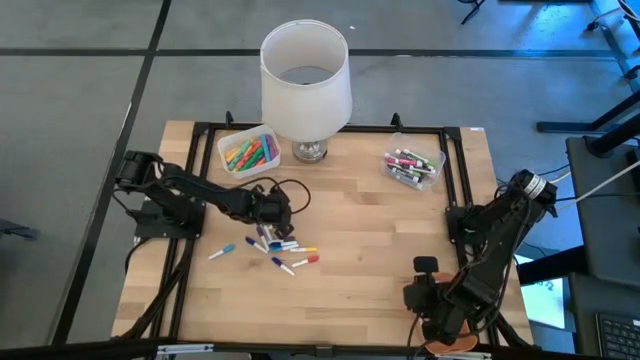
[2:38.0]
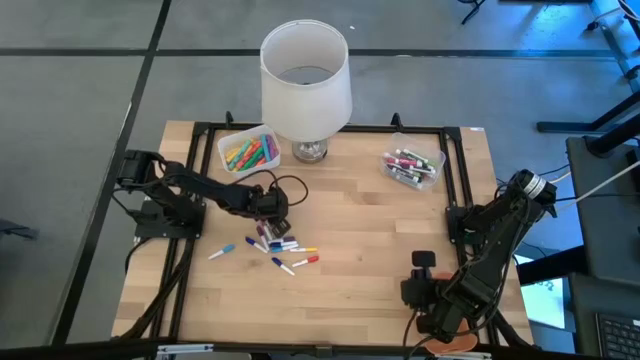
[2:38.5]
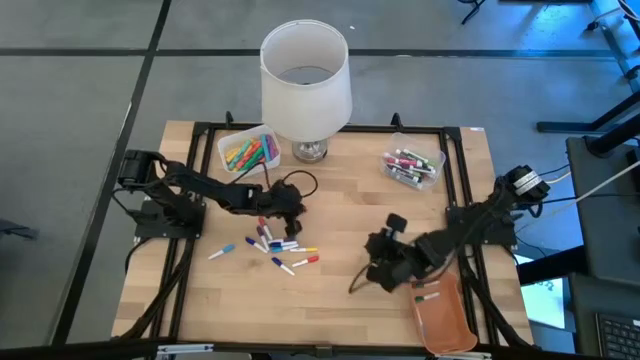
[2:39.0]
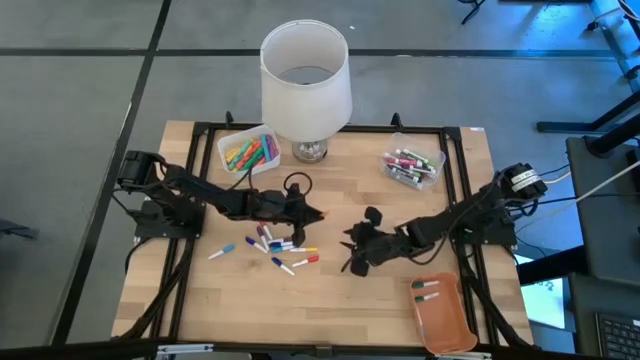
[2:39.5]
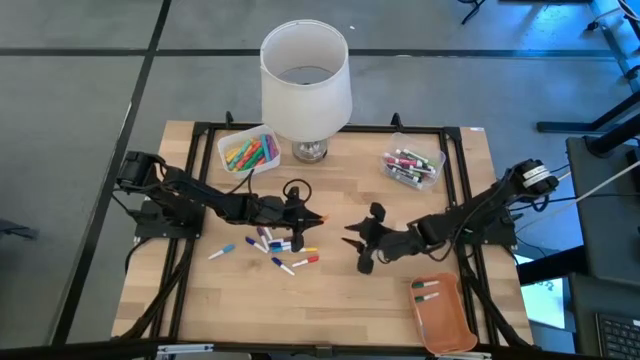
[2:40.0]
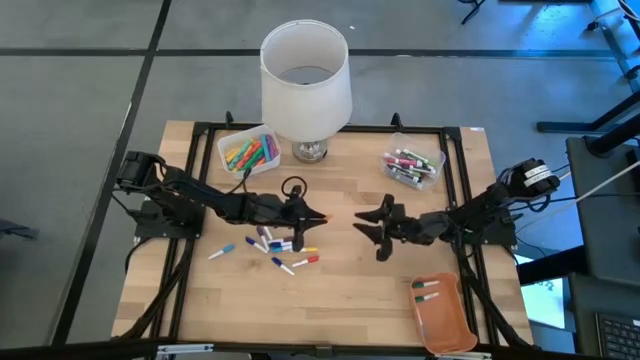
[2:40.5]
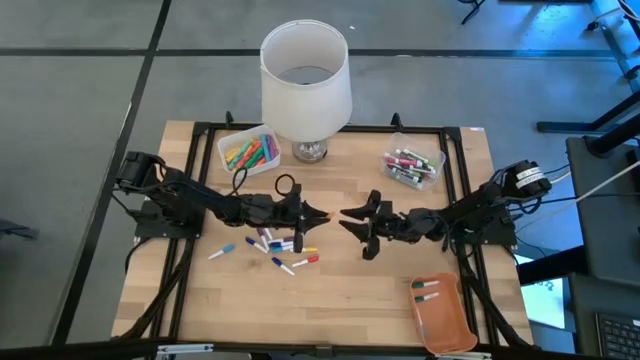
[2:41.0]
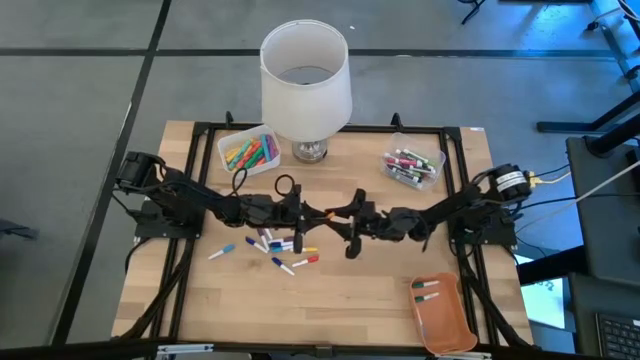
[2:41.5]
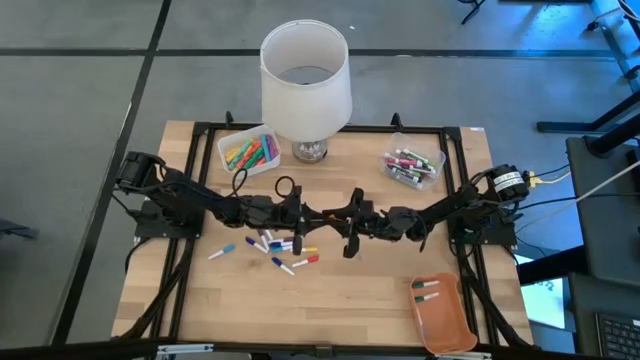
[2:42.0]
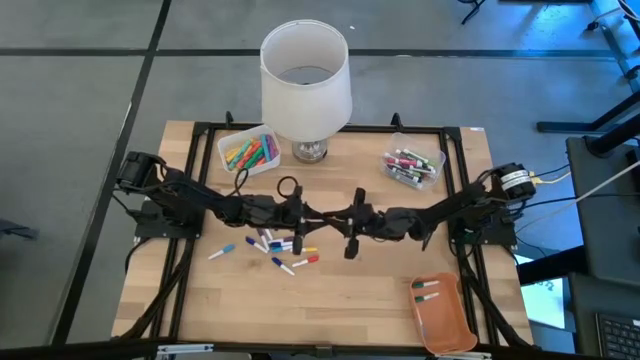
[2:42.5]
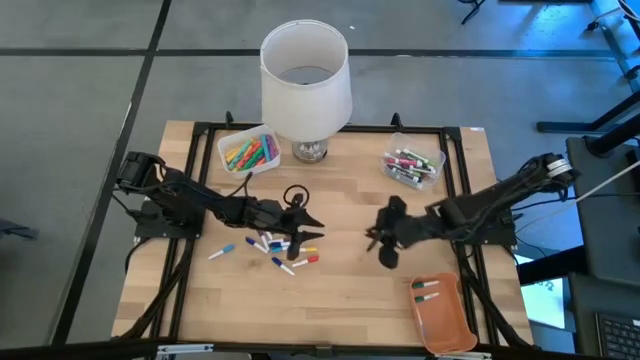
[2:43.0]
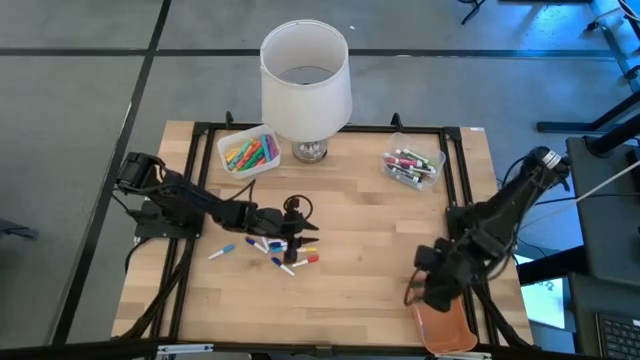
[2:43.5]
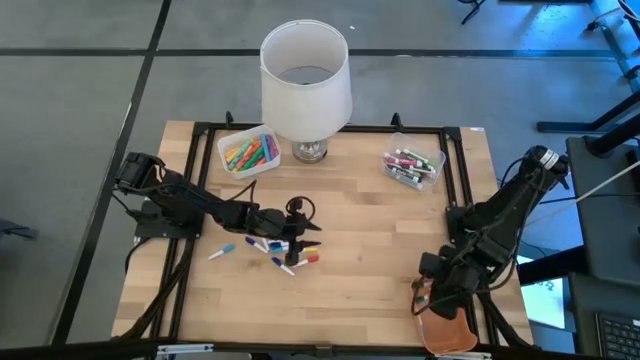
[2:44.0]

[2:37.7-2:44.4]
Task: Pick & Place Markers
Put the light orange mini marker into the orange bin

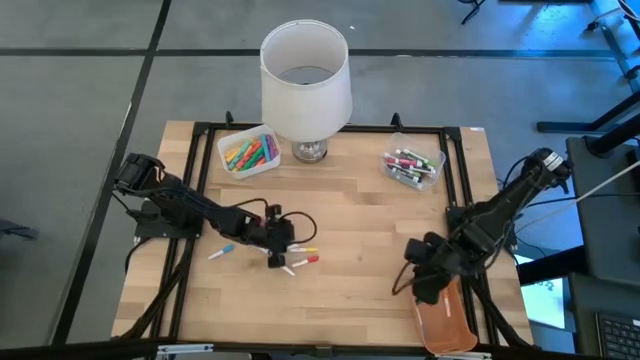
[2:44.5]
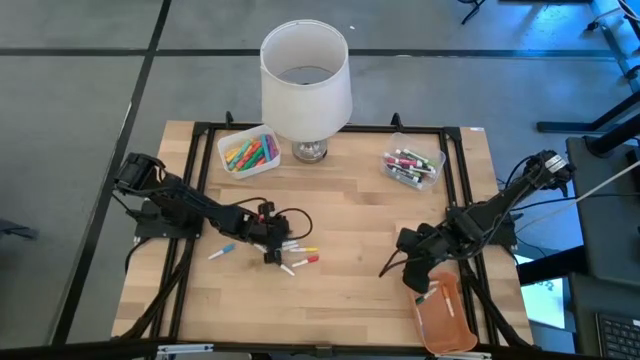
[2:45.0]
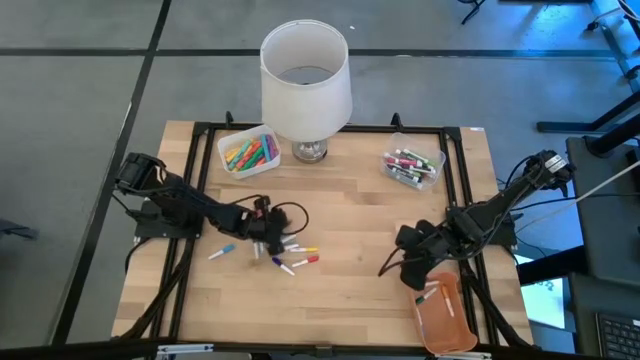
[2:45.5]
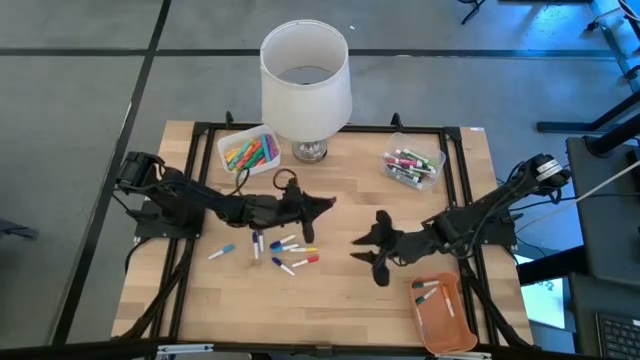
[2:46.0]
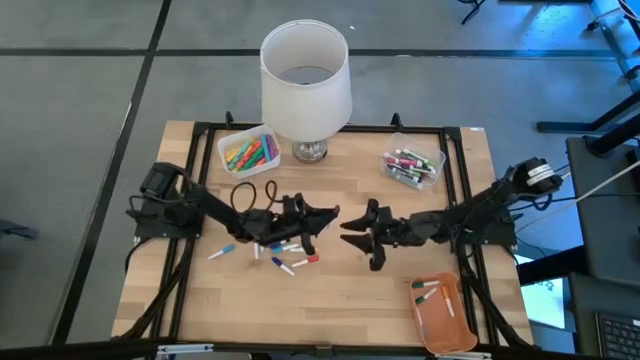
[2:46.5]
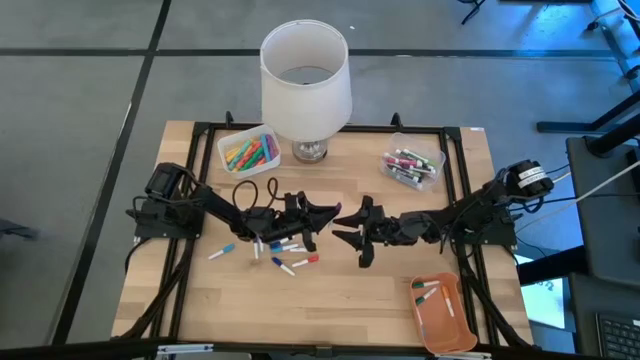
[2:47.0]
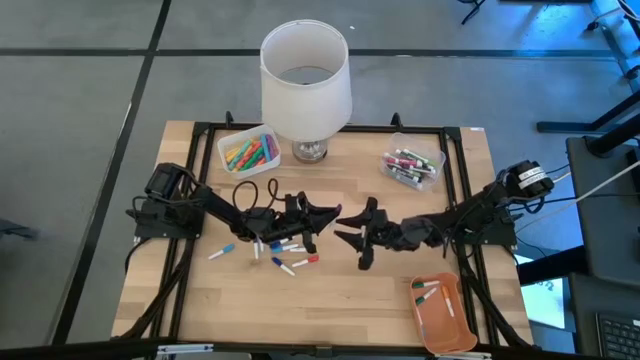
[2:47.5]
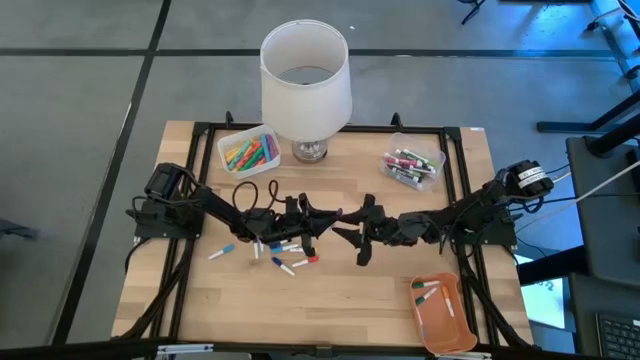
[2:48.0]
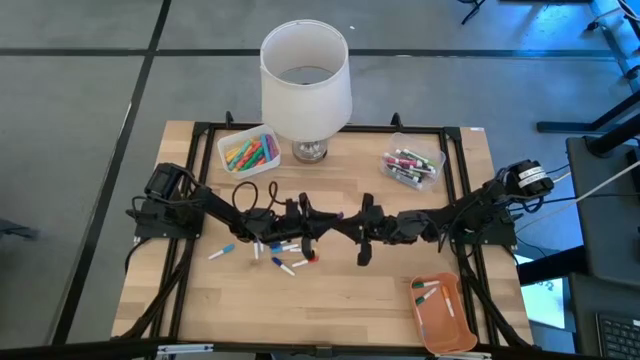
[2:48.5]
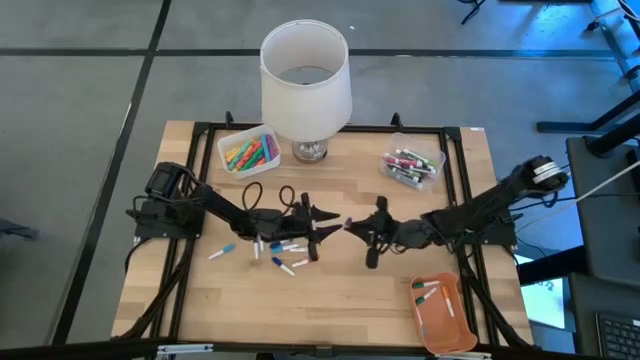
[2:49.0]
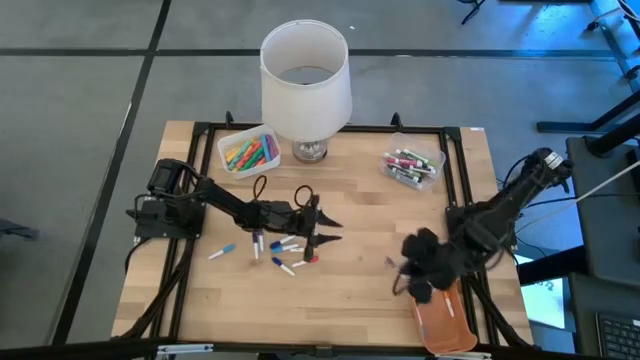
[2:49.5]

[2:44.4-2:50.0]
Put the red mini marker into the orange bin

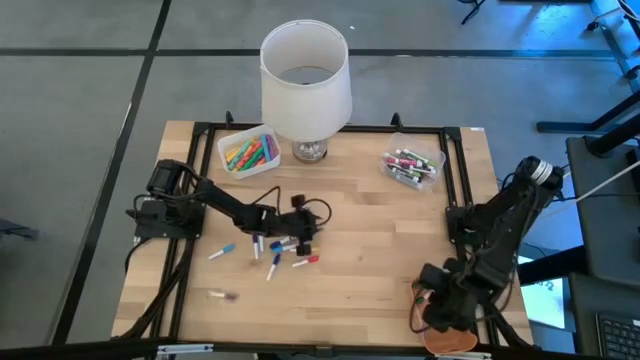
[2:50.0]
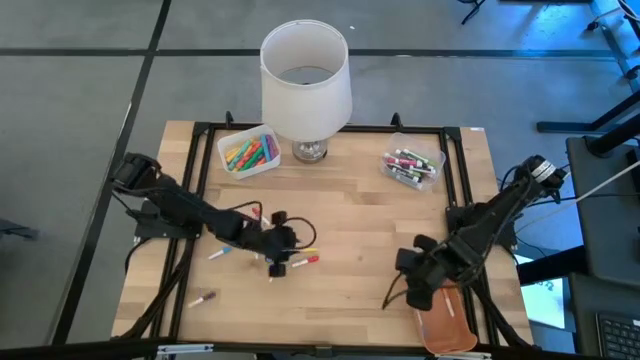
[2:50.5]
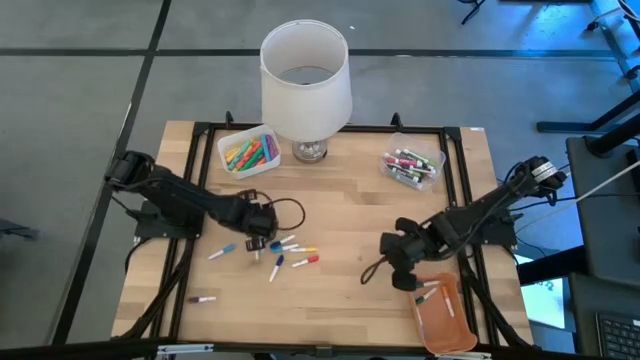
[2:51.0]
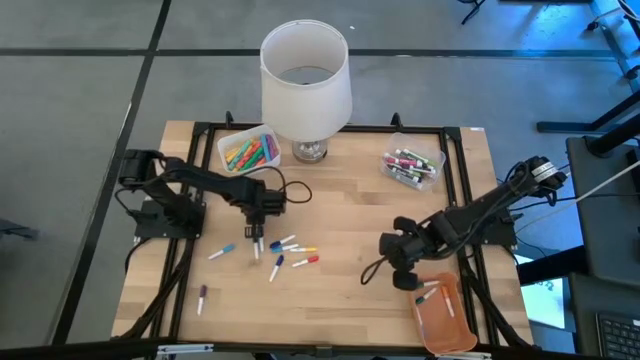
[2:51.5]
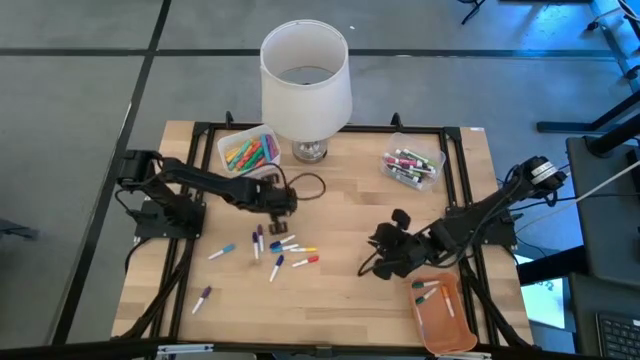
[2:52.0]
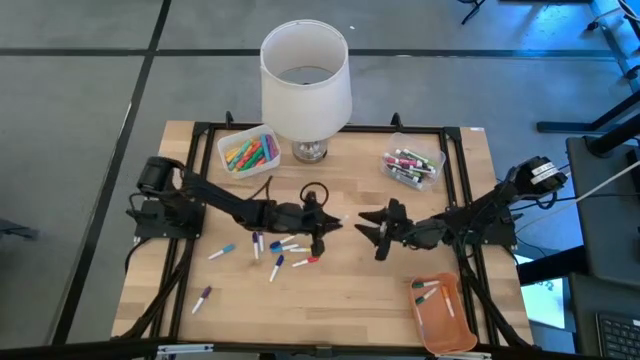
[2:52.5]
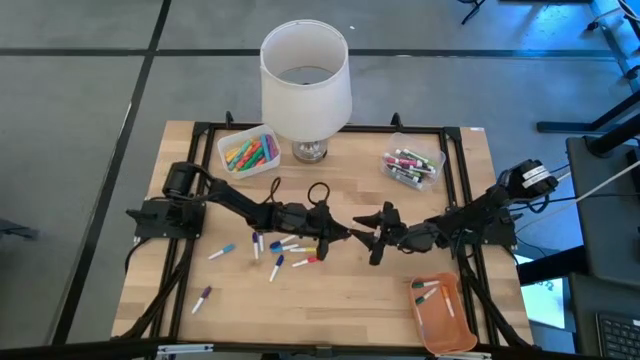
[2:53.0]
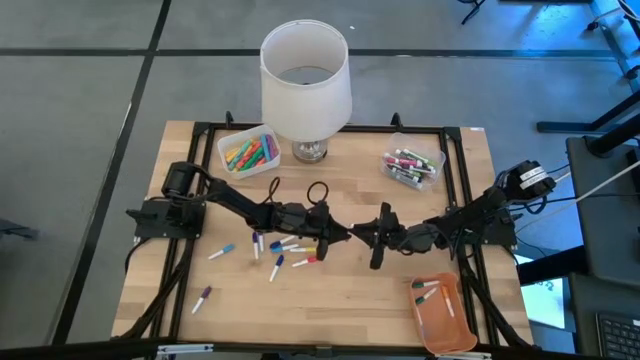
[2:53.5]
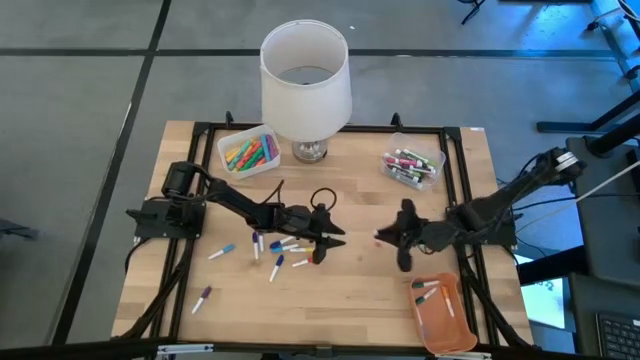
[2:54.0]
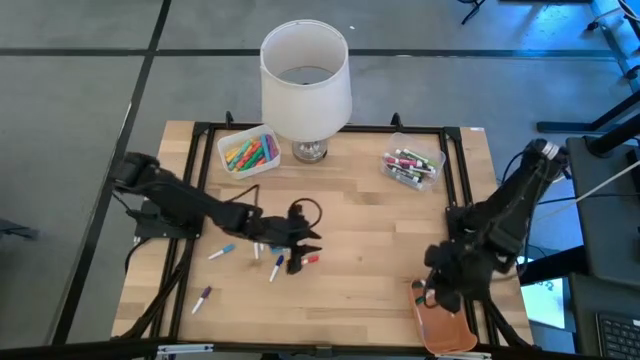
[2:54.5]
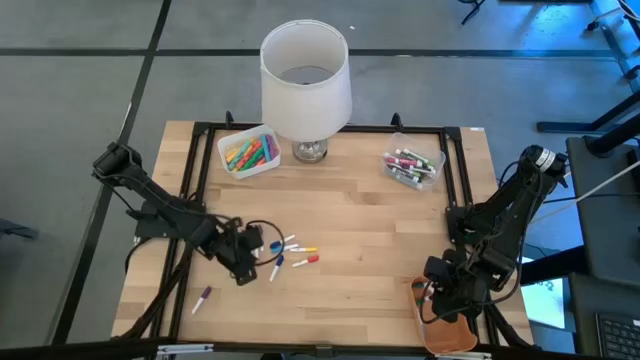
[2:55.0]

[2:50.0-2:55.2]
Put the red mini marker into the orange bin

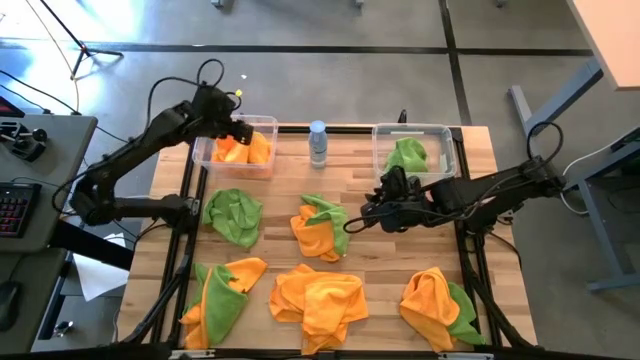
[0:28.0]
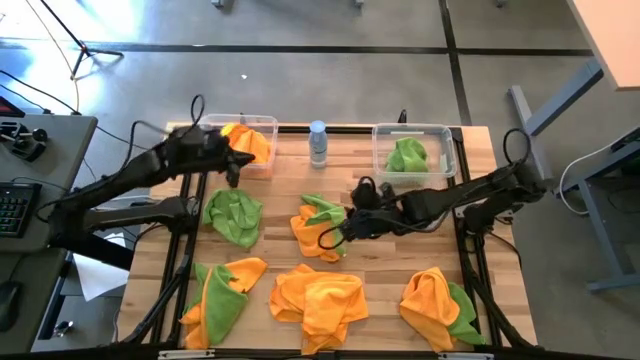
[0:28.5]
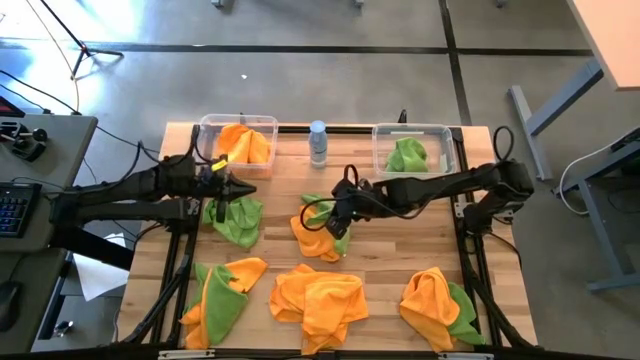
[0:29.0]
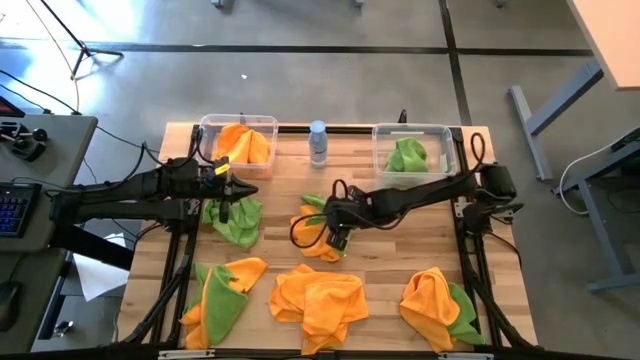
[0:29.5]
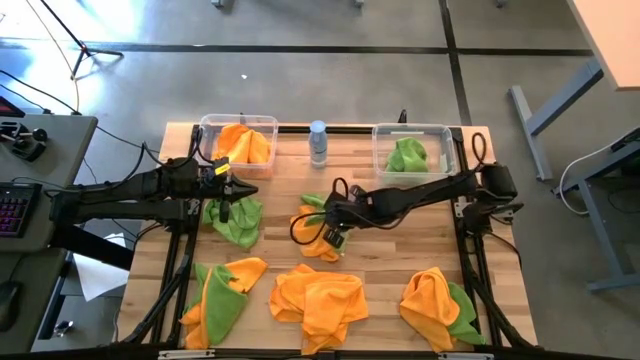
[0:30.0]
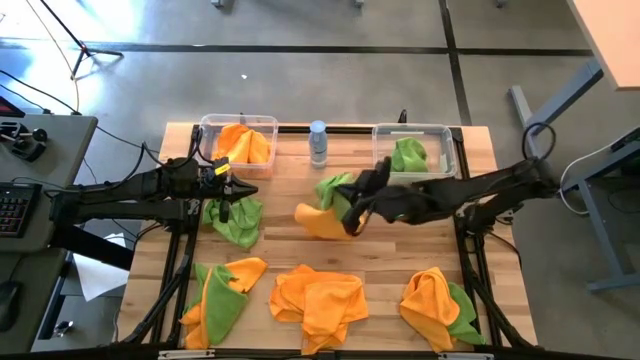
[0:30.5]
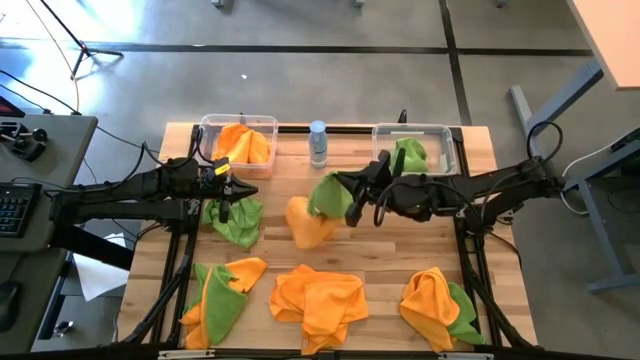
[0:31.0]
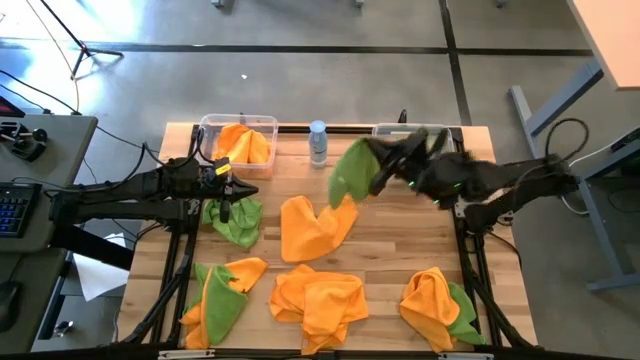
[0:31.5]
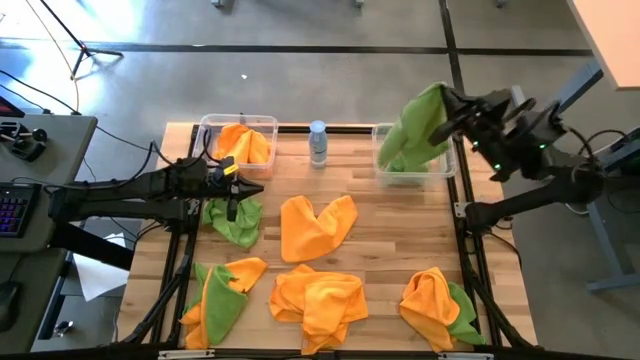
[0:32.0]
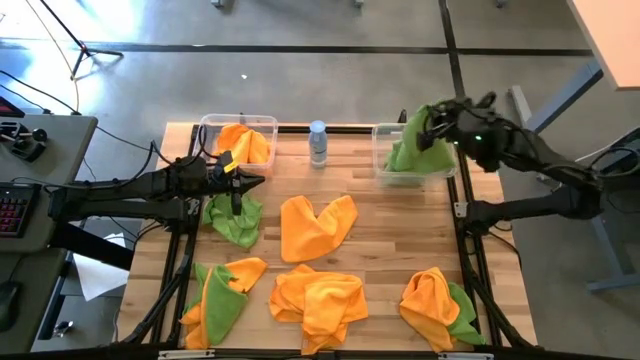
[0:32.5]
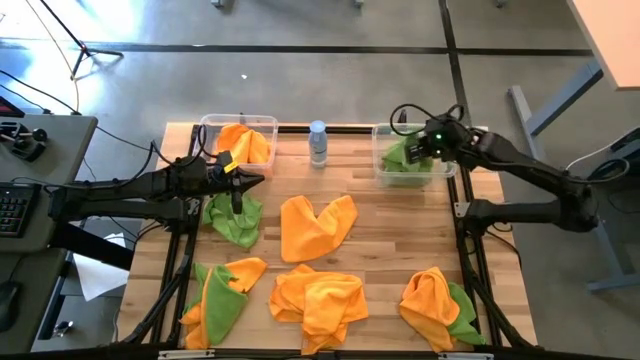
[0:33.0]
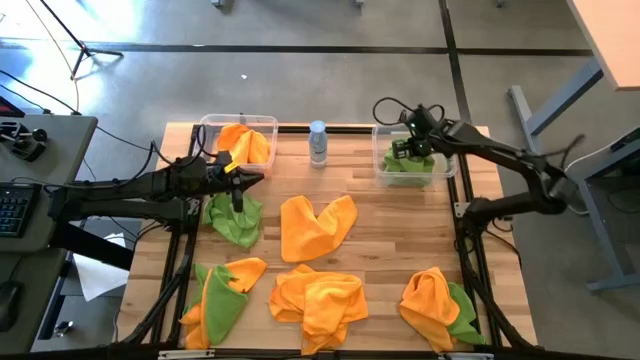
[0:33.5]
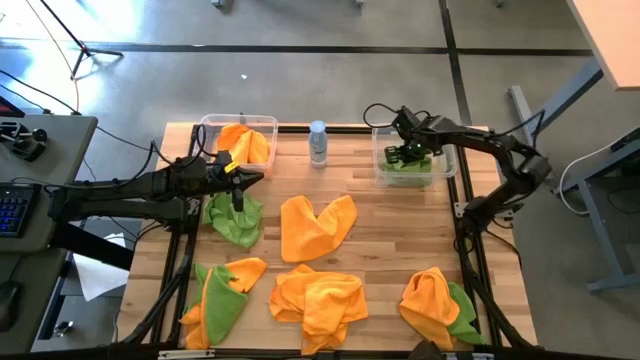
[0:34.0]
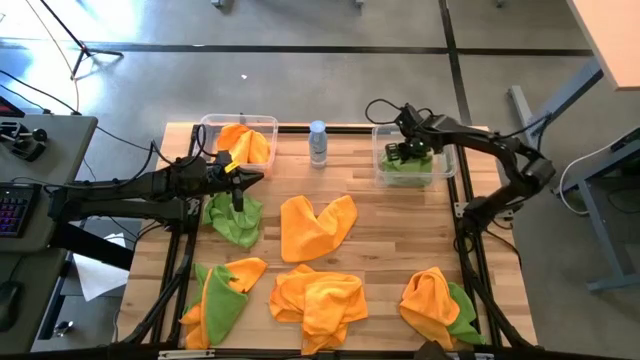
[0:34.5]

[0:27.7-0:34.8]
Task: Sort microfiber towel by color & place in baskets
Put the green towel into the right transparent bin
